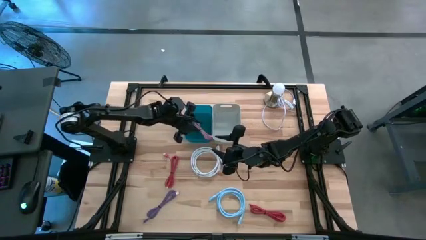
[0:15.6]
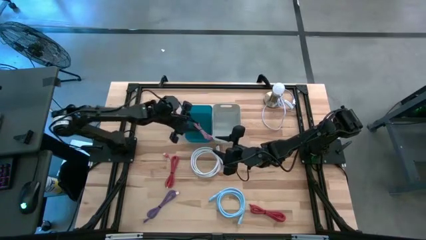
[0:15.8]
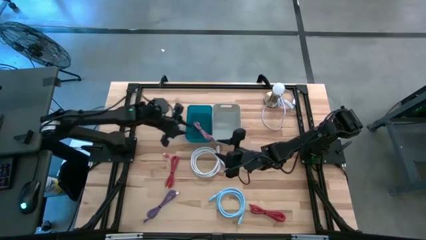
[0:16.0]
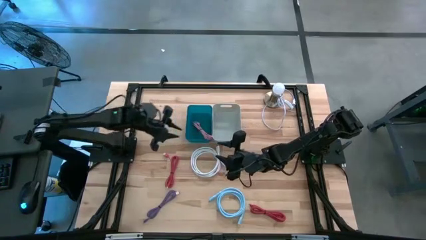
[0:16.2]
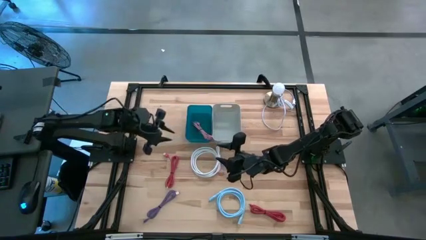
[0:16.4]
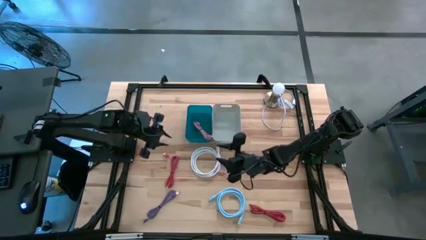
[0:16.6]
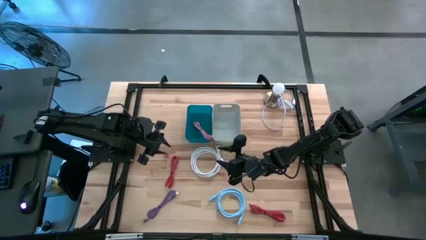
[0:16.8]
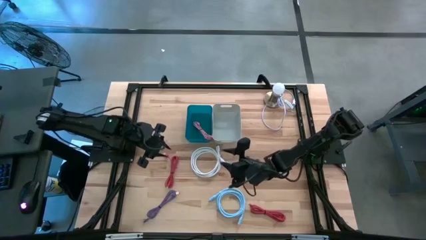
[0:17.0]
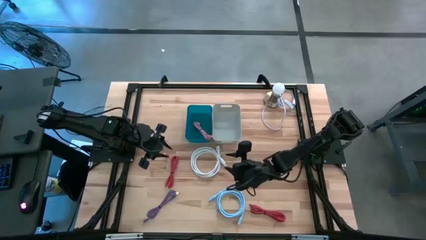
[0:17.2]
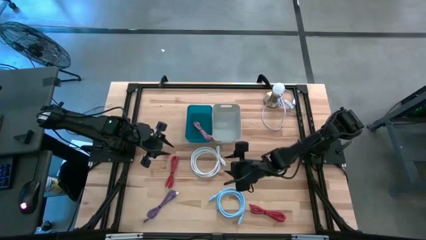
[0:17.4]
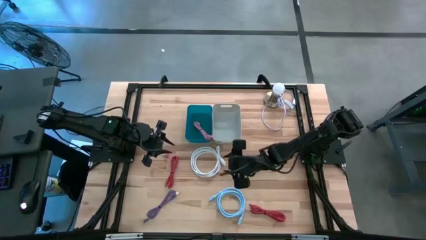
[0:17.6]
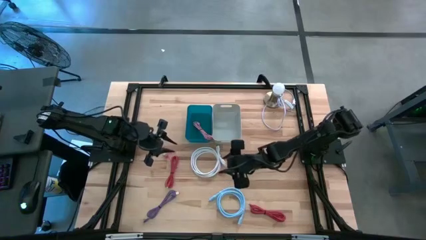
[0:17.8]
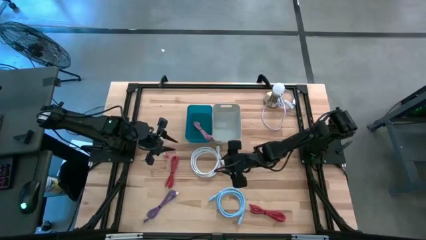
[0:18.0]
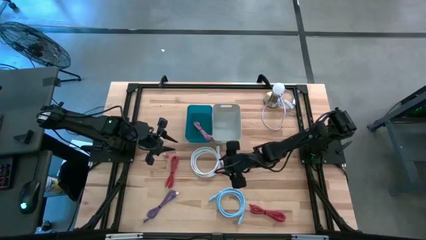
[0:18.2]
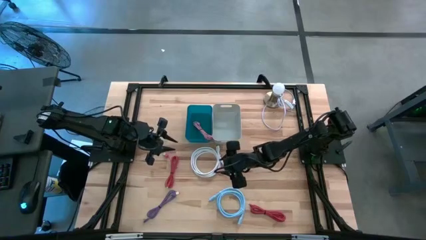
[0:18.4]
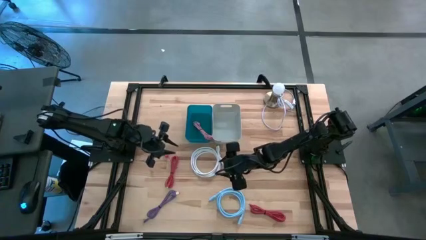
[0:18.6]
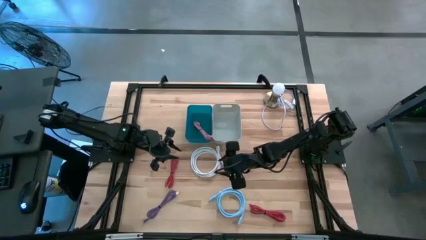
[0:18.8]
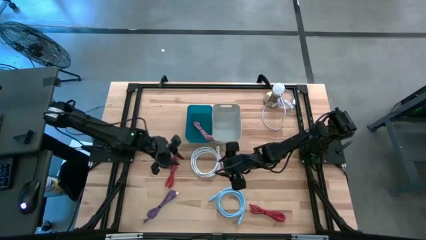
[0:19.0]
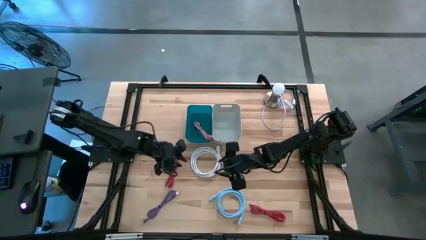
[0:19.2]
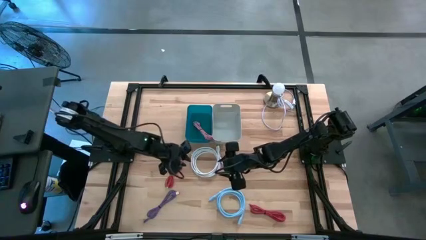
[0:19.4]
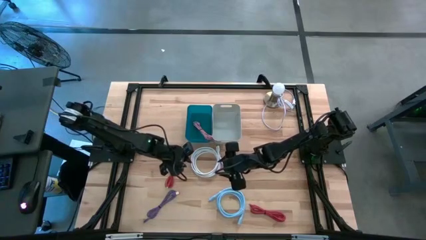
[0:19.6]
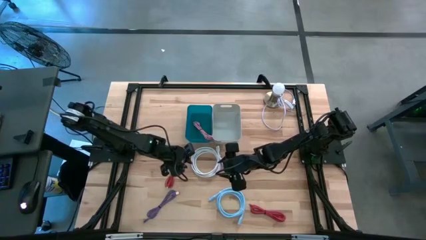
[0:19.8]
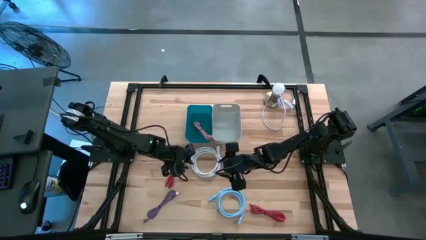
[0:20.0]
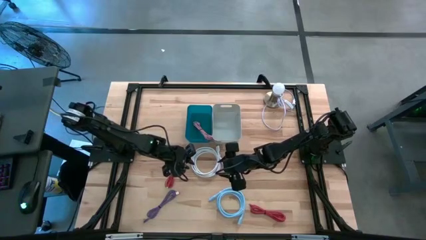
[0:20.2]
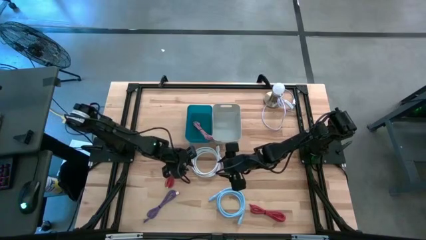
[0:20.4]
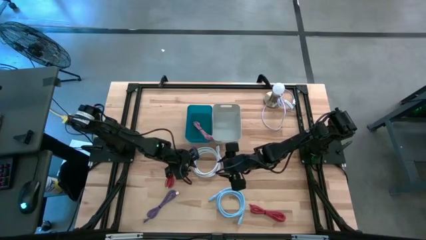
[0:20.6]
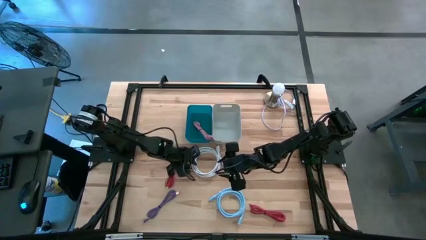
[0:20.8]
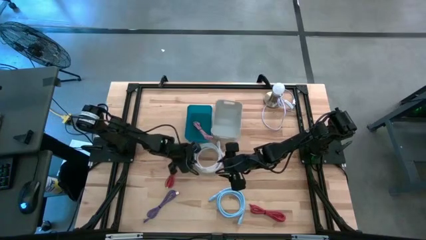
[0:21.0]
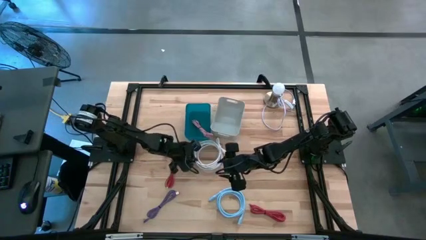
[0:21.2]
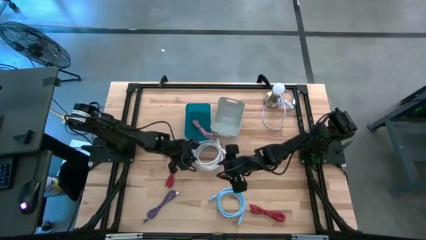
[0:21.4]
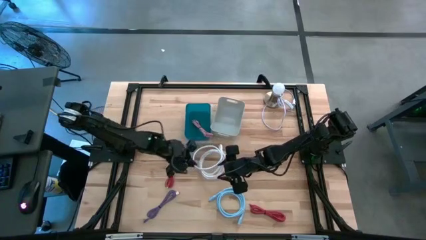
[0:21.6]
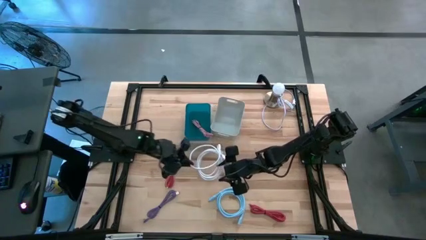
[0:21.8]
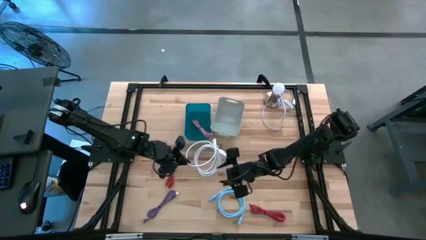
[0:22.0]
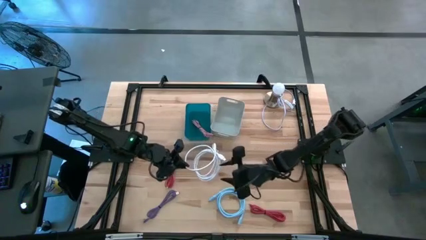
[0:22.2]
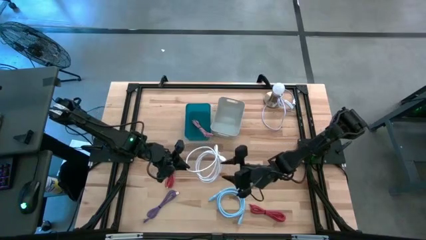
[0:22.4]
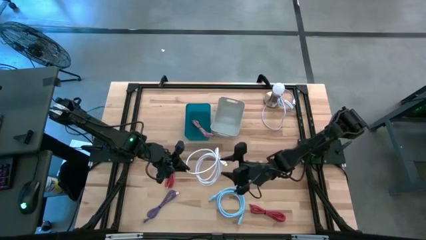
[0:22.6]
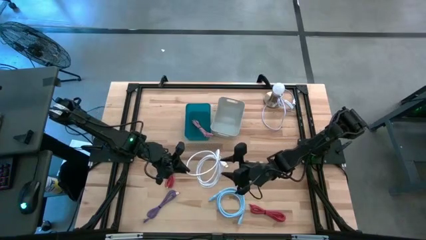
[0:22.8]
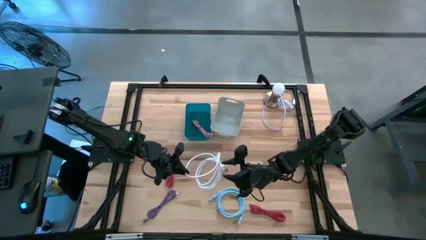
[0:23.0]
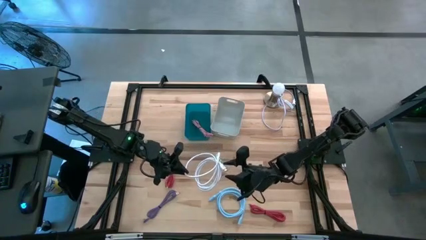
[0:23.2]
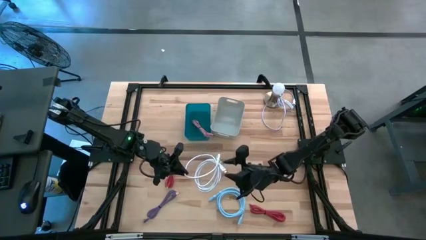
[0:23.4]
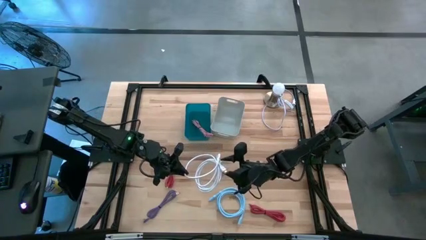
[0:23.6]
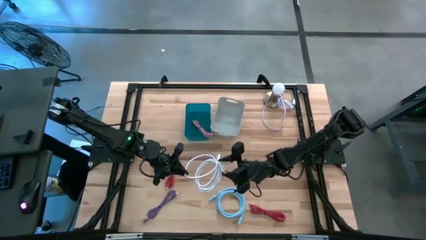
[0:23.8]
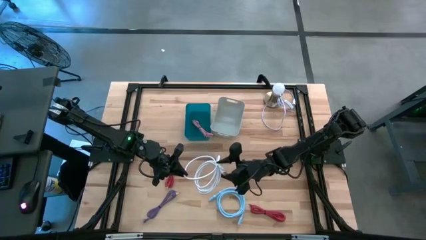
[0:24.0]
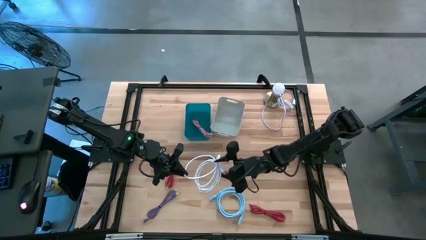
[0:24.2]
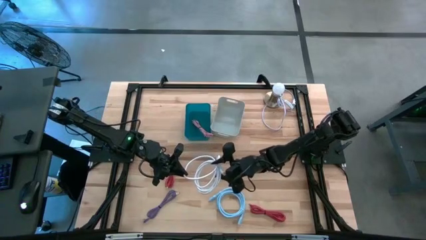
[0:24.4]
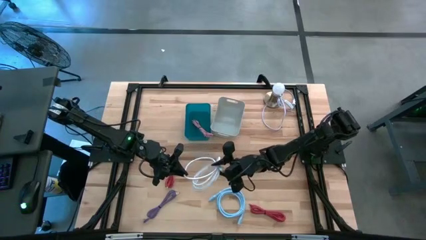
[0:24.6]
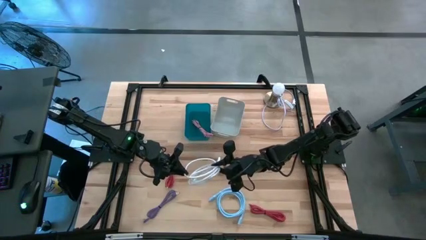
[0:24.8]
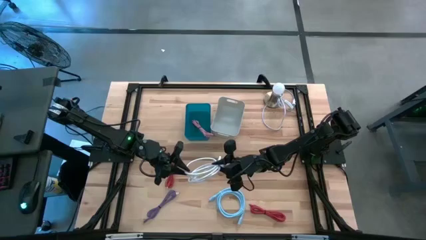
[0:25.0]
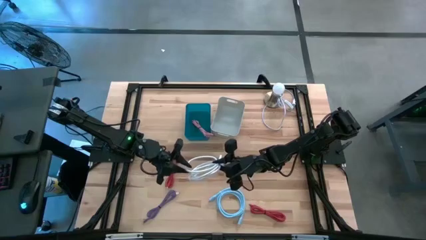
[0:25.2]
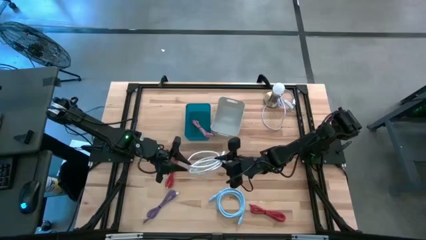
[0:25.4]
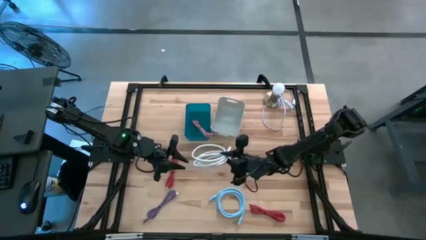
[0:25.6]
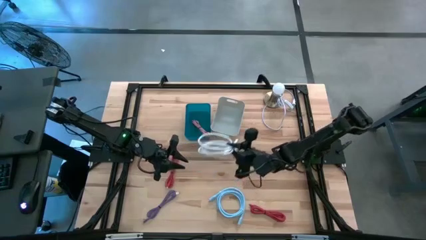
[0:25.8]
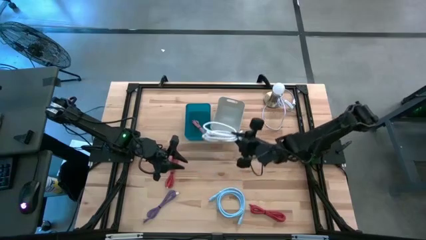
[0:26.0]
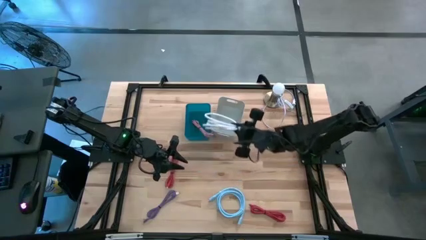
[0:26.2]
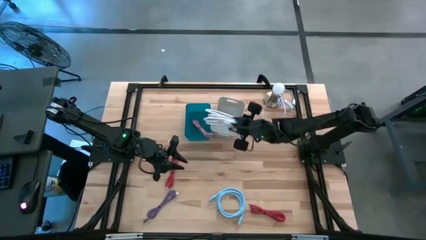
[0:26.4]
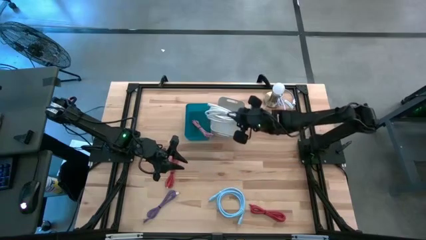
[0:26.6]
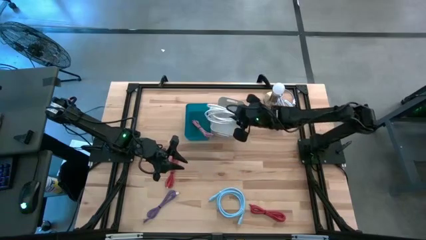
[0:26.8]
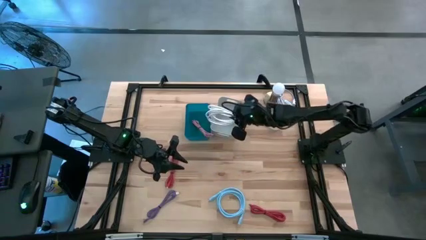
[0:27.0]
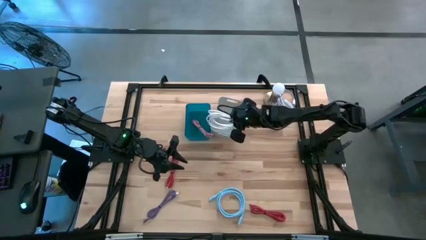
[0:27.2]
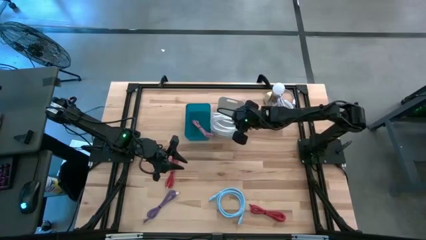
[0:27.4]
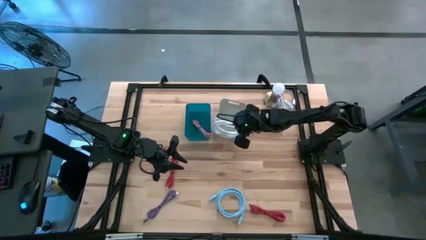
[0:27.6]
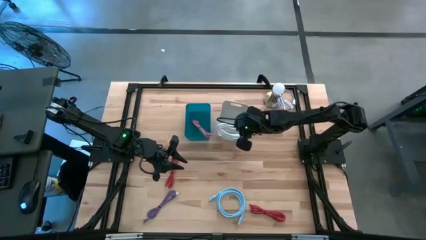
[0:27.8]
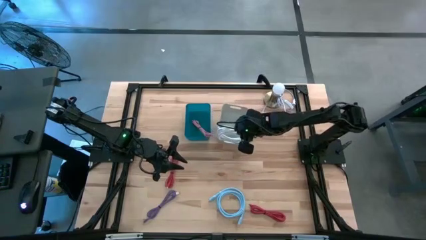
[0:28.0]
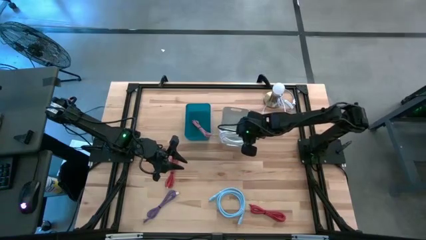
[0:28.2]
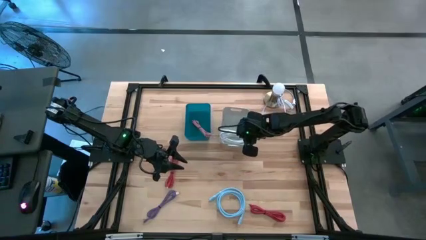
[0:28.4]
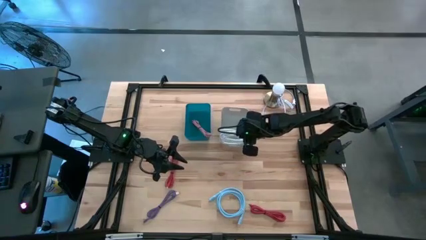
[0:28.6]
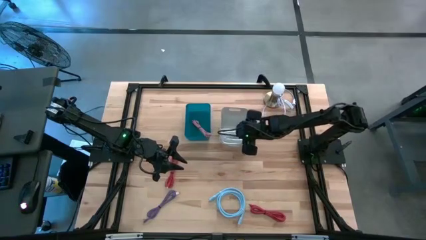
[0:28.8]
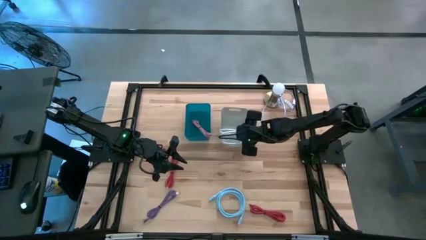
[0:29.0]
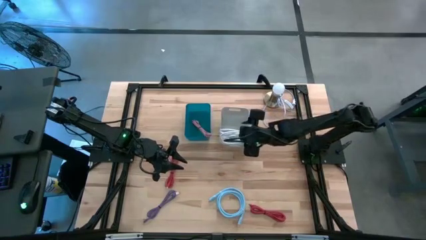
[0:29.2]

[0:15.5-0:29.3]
Task: Pick & Place USB Port
Put the white HDMI cable into the gray bin

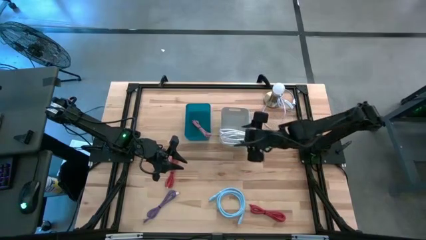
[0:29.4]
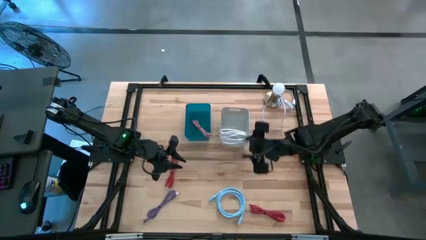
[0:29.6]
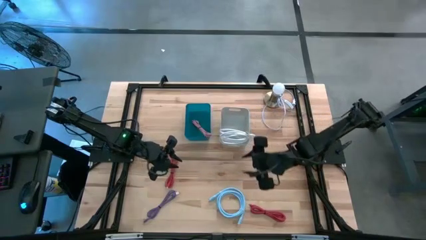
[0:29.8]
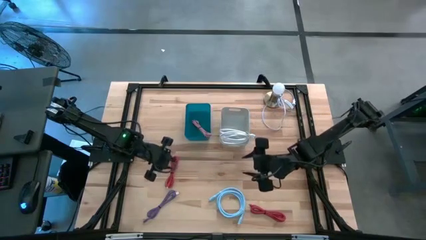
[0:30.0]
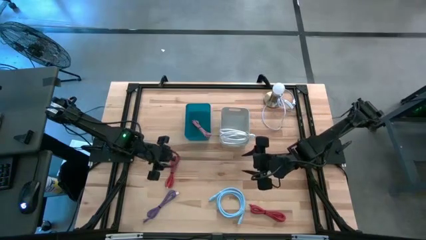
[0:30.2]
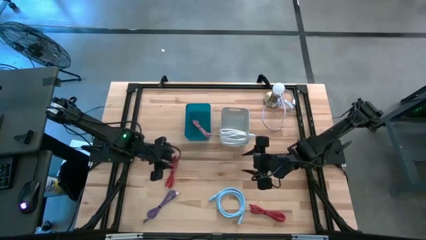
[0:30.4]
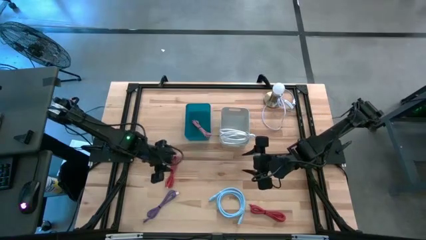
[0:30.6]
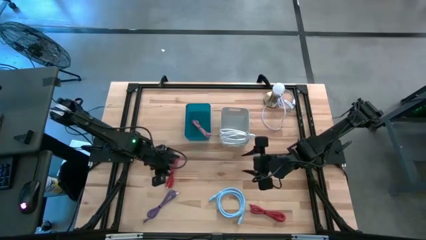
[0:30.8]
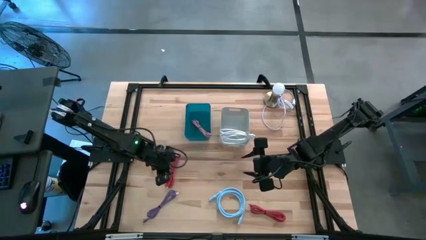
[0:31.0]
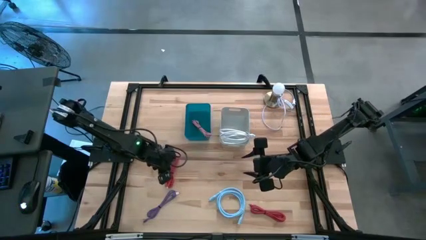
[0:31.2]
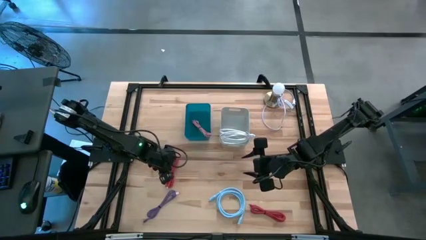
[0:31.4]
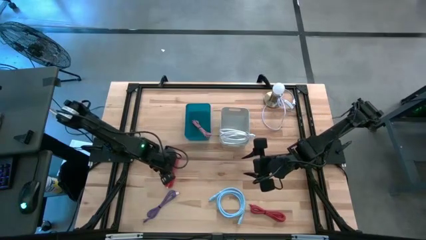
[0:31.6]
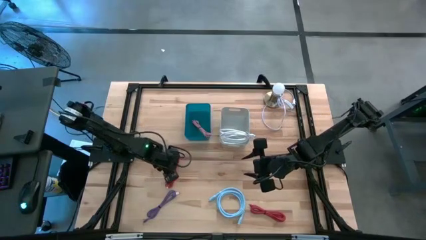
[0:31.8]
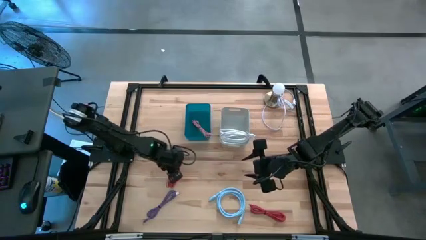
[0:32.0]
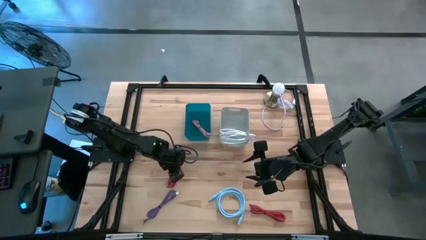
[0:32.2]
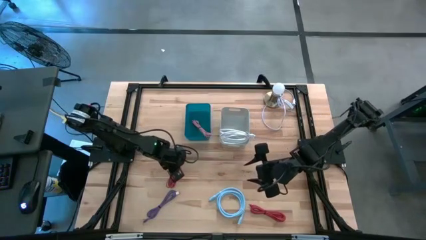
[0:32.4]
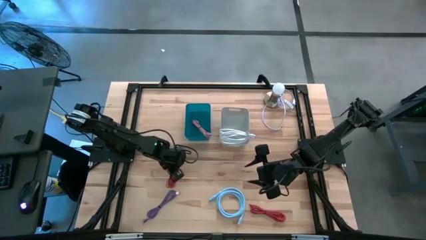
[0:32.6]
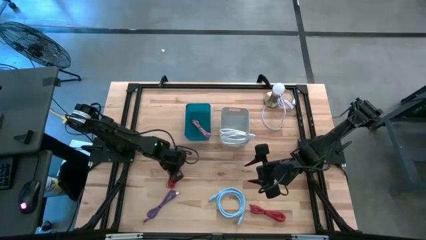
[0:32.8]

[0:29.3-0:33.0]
Put the top red charger cable into the blue bin
